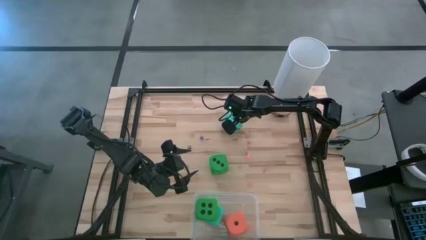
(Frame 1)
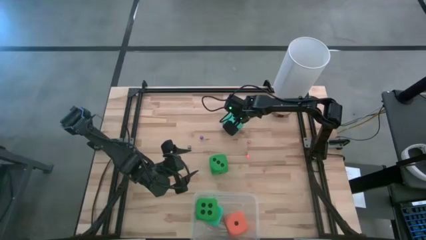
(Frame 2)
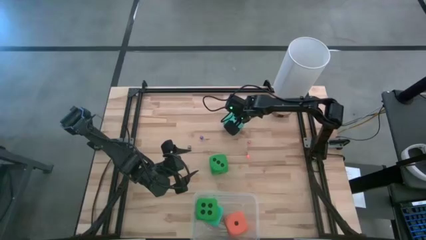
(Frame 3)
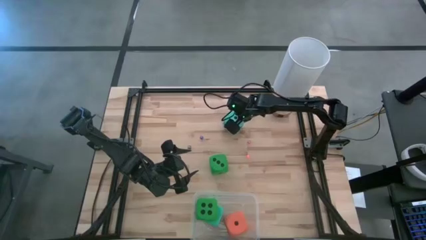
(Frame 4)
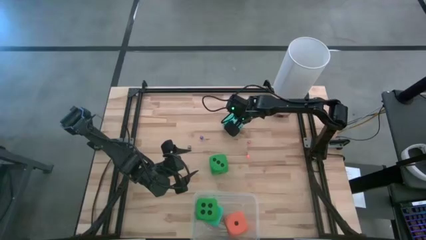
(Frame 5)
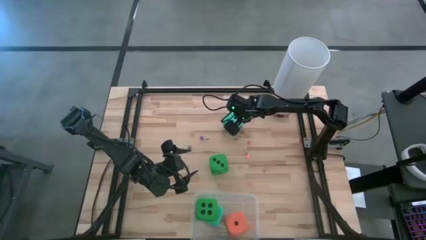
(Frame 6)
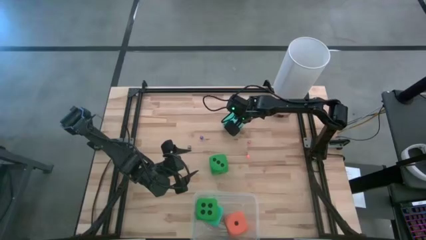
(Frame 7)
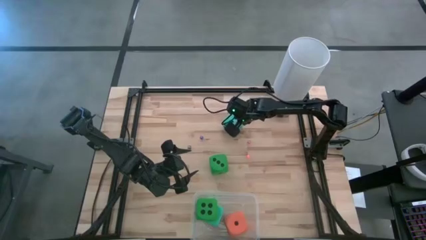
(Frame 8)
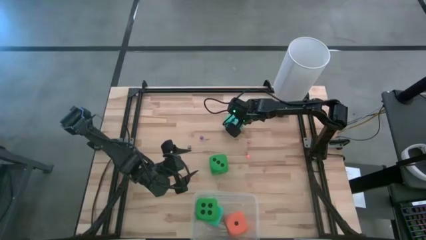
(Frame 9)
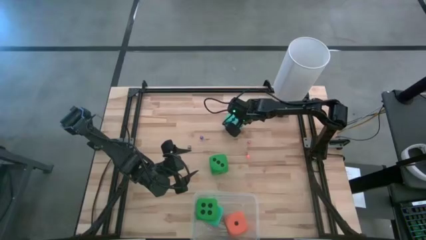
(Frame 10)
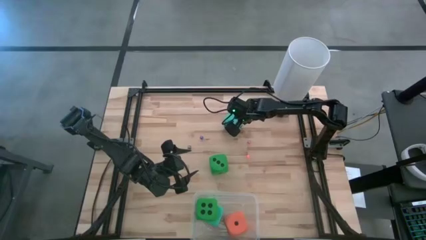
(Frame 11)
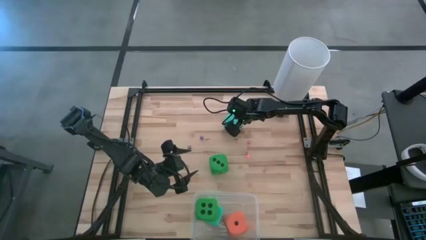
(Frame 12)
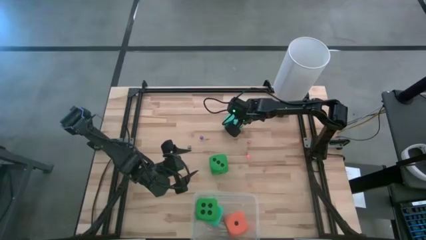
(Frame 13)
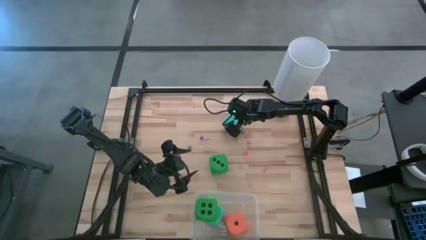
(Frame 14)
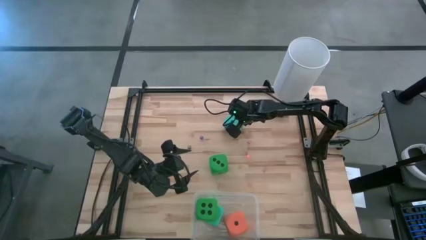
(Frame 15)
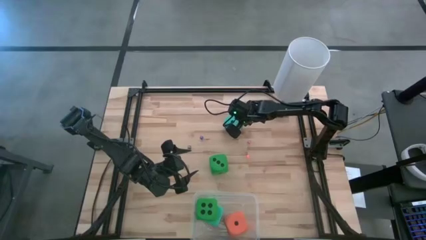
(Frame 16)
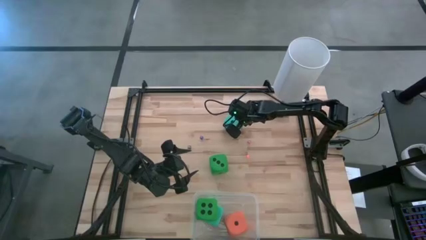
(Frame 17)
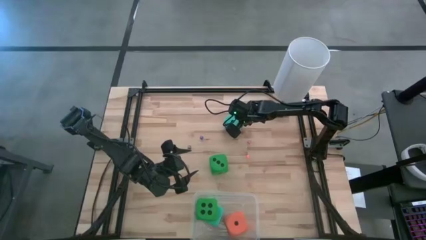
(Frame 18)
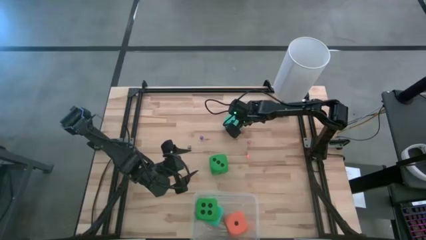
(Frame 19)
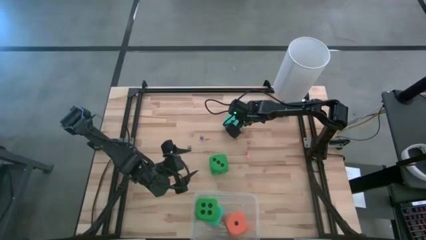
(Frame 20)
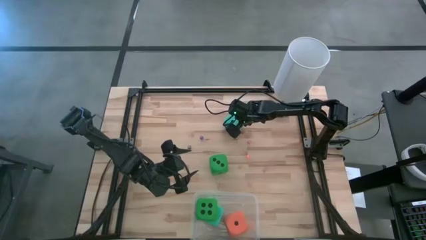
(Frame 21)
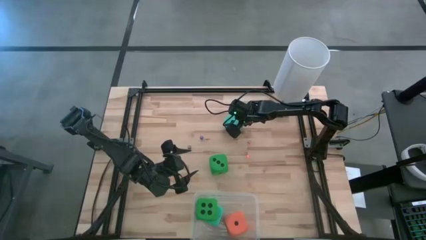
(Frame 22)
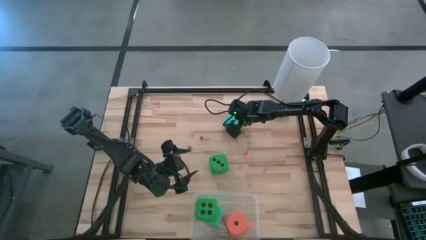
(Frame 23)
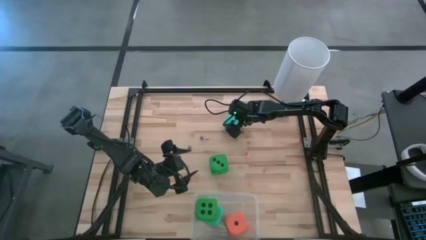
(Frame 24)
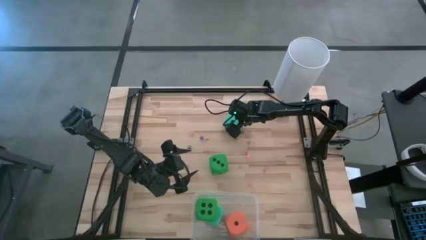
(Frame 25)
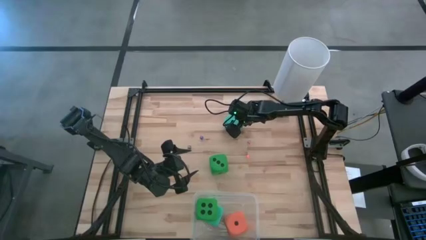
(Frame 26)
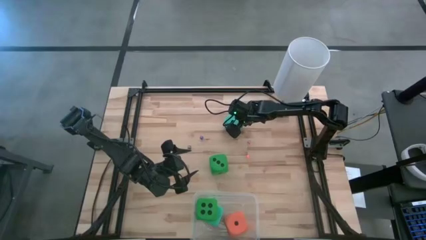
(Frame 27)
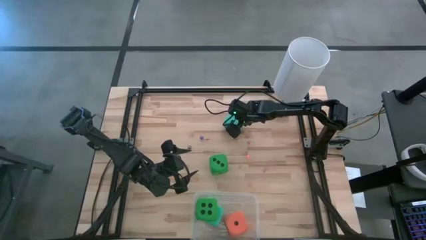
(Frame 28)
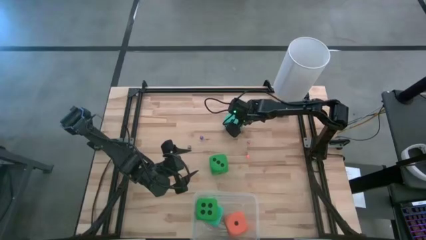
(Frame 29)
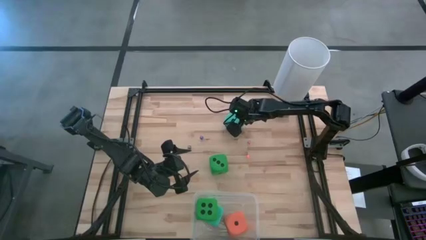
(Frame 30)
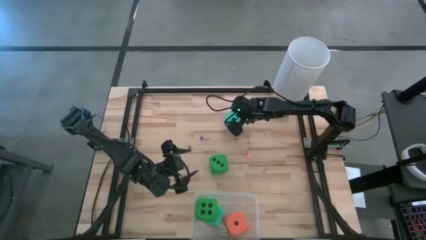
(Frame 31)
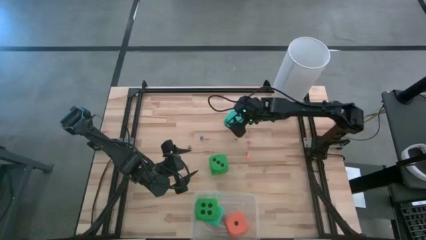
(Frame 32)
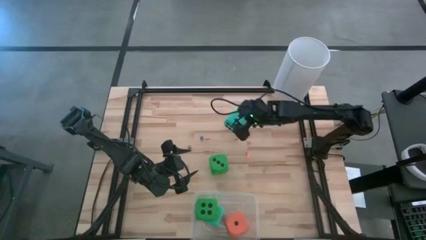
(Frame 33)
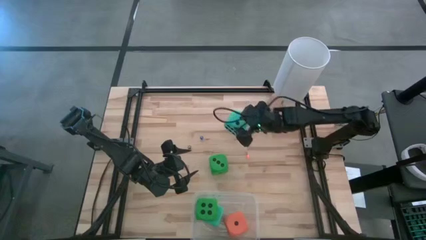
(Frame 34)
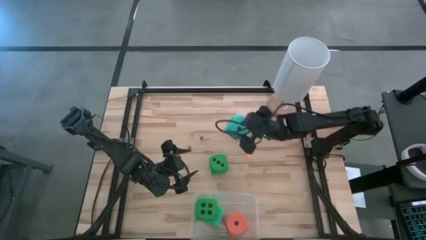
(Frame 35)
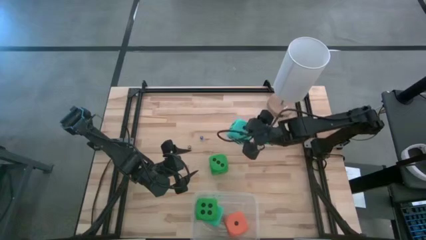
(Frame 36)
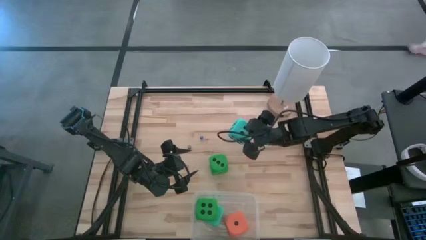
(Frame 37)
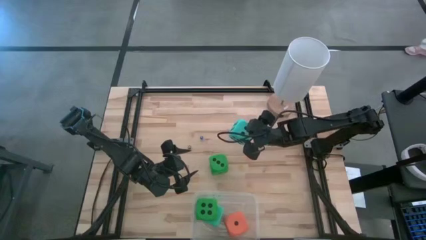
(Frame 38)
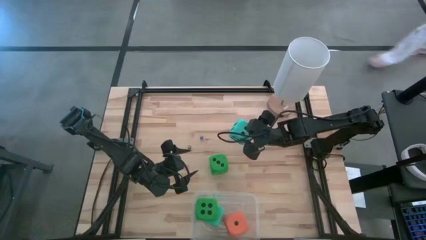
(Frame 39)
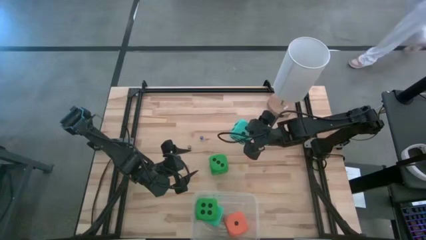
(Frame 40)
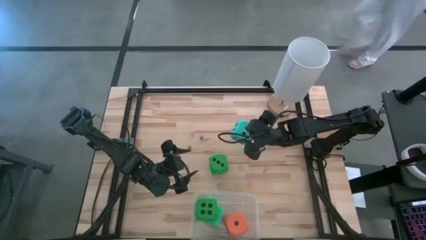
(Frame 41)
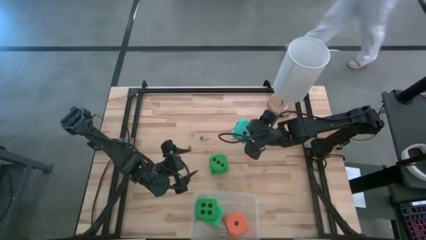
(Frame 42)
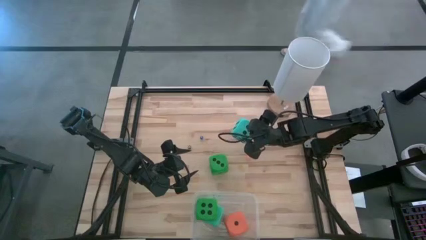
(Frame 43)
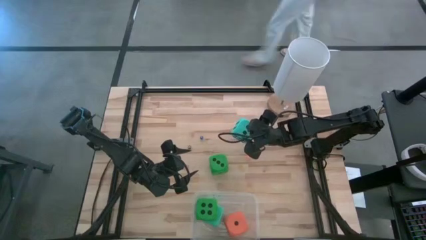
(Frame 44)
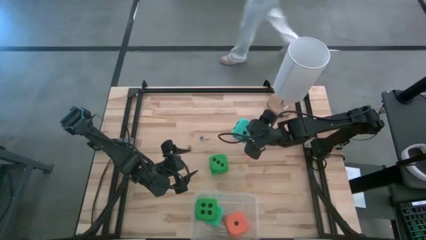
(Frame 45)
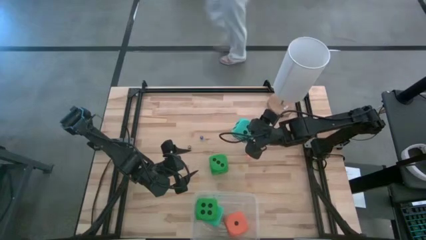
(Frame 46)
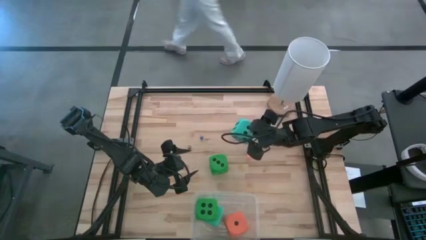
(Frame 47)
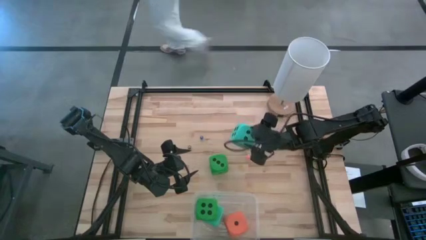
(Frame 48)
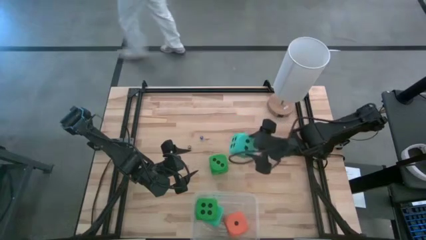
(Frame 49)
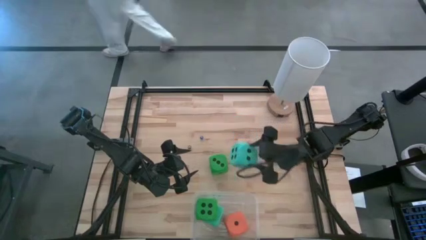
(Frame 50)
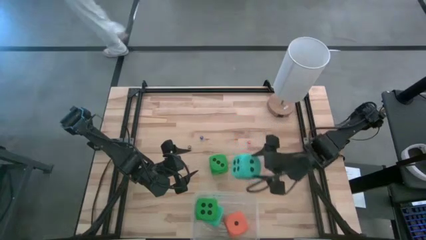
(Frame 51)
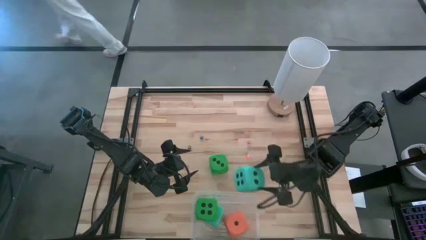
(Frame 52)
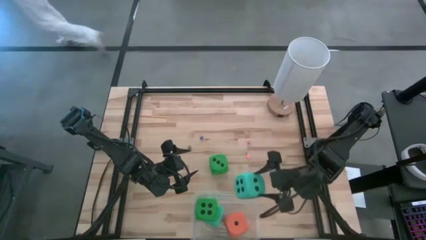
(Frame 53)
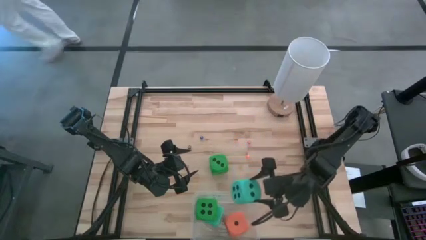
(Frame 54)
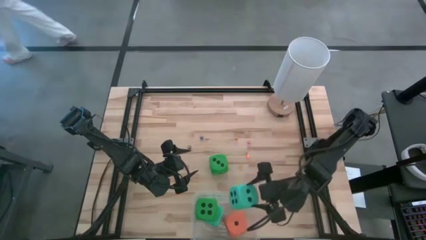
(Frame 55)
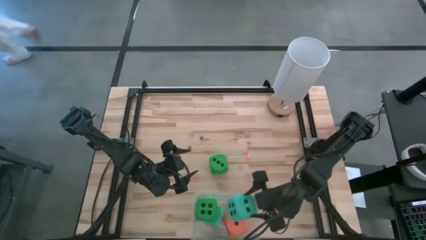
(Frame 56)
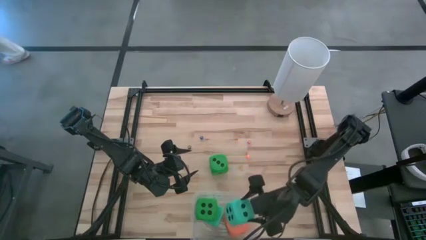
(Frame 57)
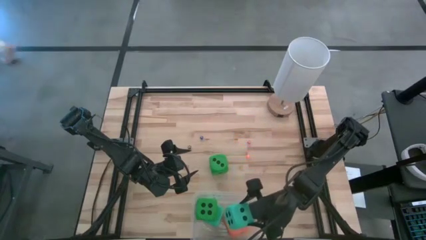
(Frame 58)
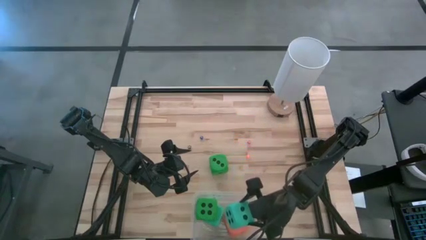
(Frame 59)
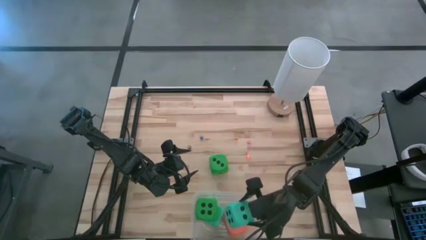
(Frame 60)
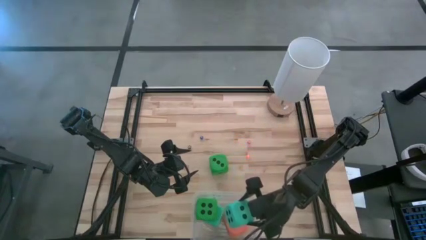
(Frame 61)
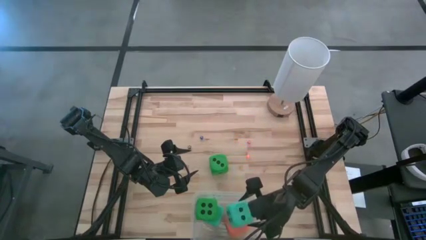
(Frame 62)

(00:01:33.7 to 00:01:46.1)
Task: Pick & Place Dice
Put the large blue dice into the transparent bin

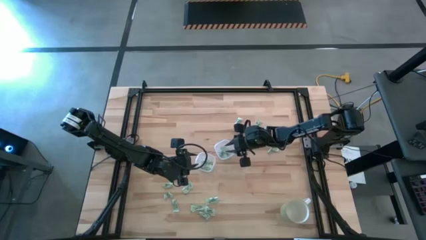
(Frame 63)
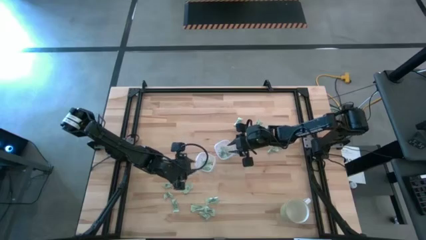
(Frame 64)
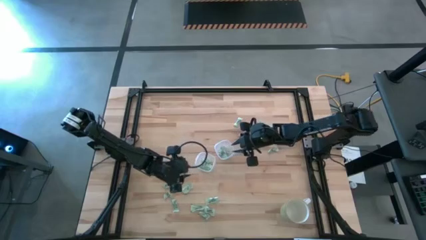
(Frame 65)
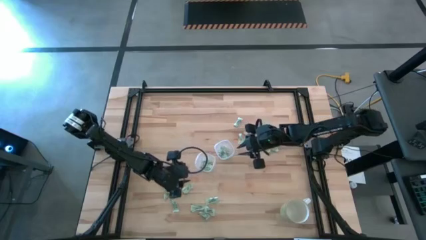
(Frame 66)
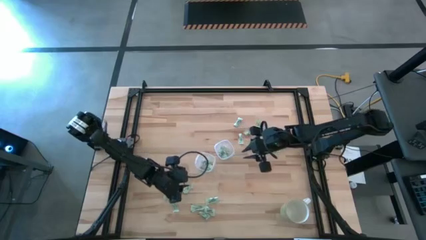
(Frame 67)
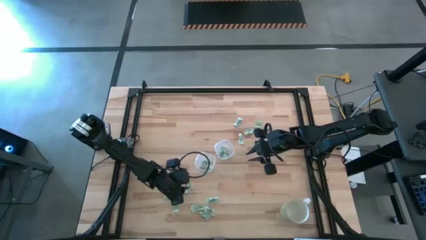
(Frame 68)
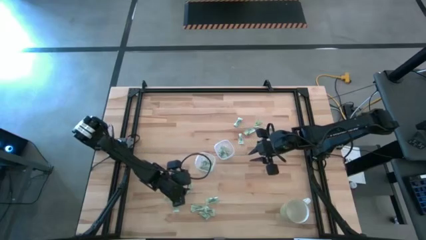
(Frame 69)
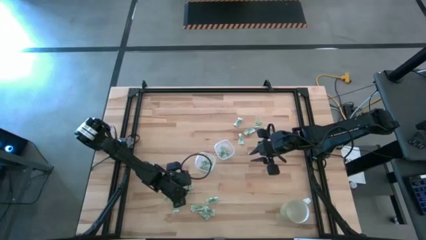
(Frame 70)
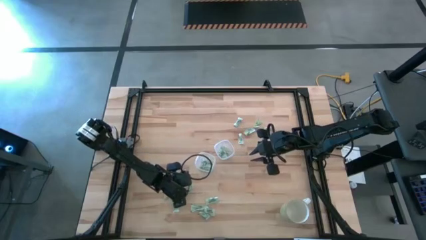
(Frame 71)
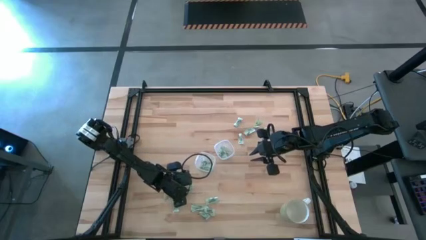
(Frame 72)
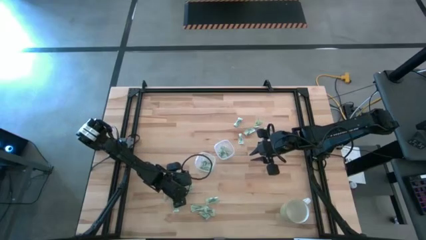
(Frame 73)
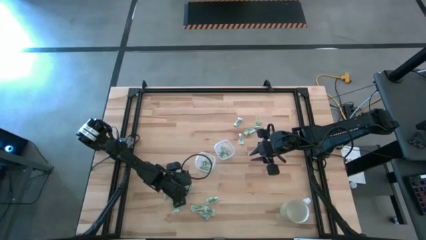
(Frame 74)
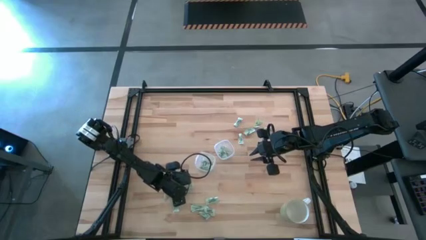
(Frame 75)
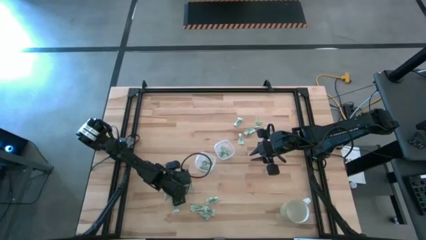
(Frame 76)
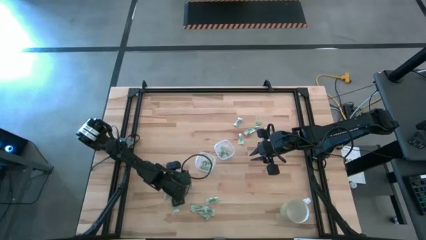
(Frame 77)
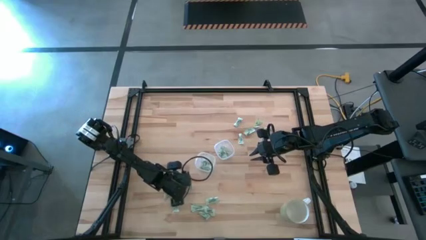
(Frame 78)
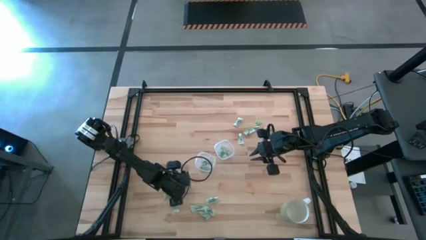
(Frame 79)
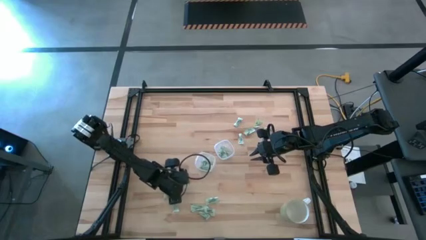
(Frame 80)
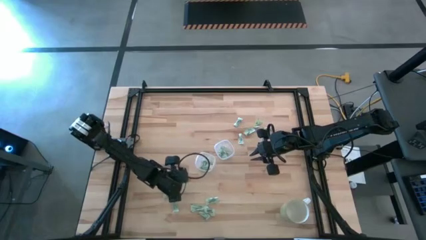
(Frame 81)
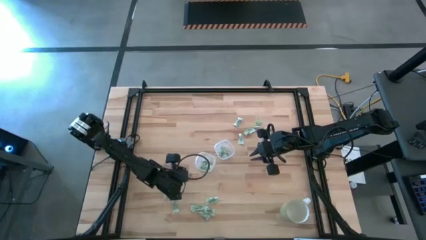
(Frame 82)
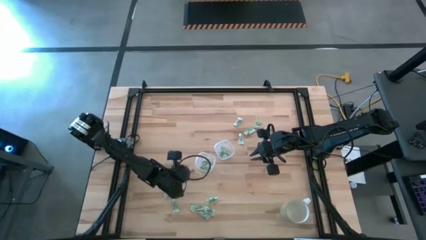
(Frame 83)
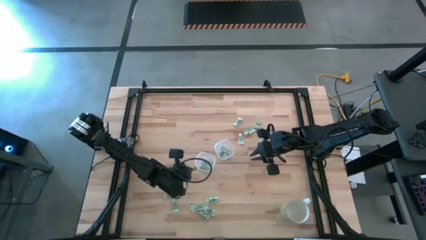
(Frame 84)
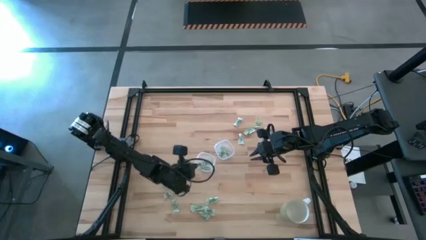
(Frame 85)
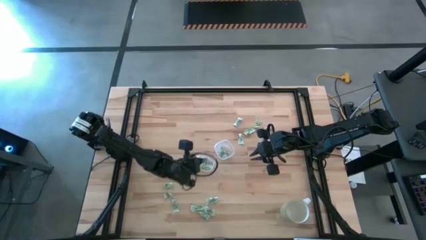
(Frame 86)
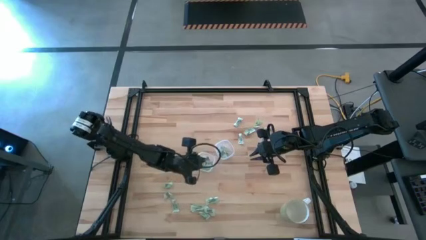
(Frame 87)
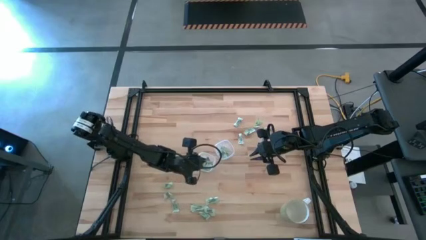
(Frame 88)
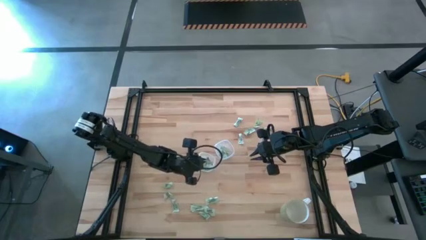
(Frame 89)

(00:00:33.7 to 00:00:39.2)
Task: Pick and place items into bin
Put the stevia packet into the left bin
